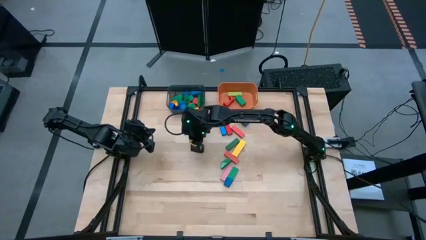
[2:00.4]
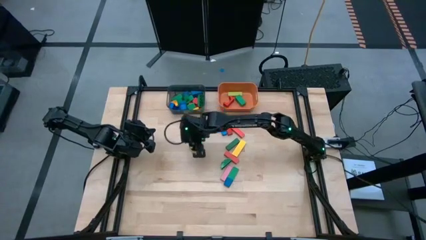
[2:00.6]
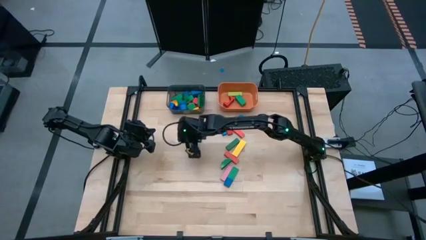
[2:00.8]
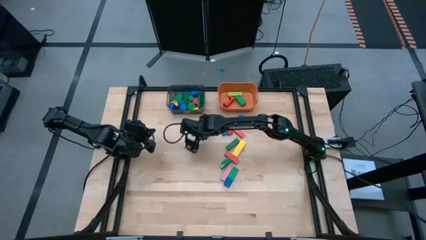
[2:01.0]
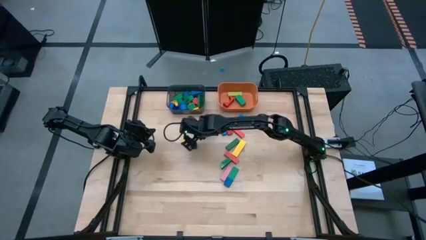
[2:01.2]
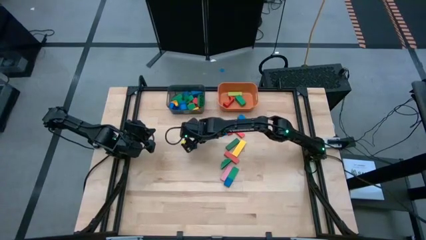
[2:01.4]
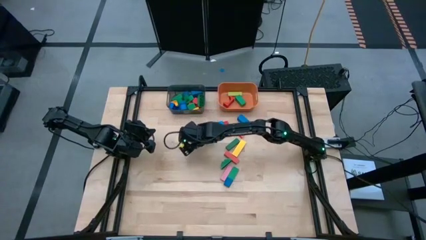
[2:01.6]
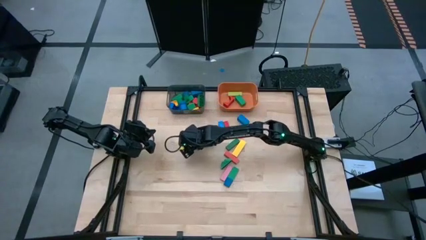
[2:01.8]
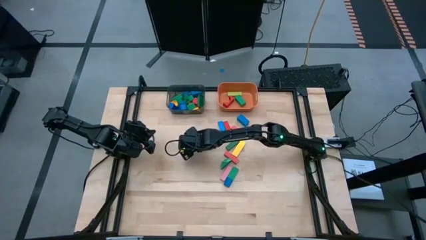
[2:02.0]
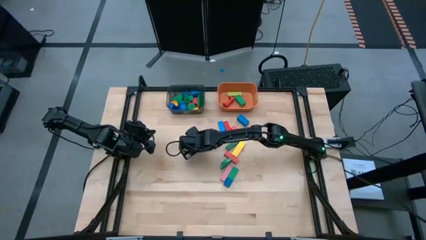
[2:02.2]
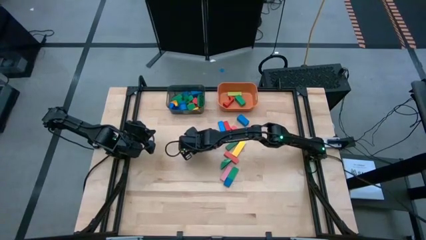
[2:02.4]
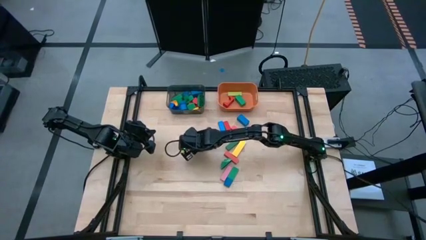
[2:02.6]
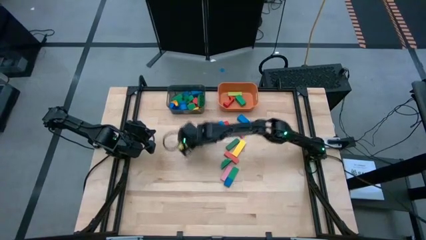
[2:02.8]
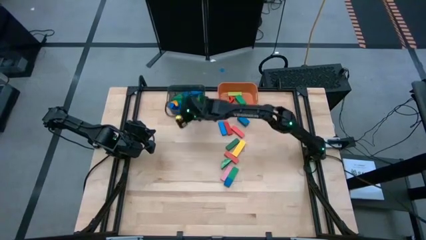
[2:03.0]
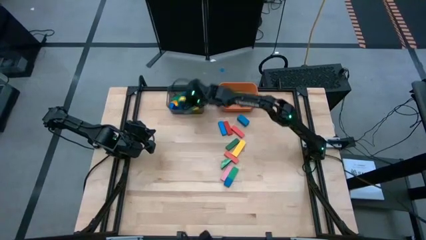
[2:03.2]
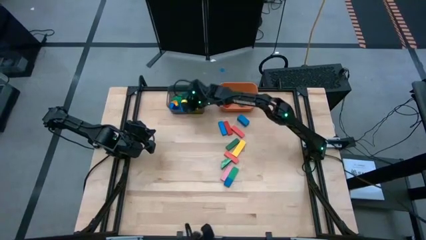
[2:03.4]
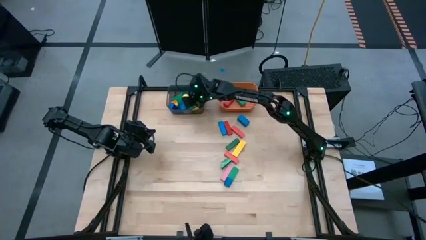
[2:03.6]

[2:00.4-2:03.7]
Task: Sort blocks by size
Put the small blue block into the black bin

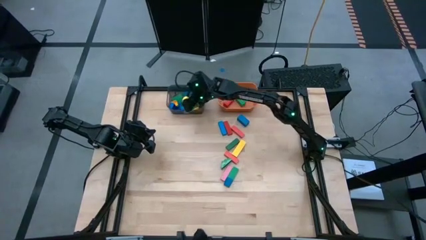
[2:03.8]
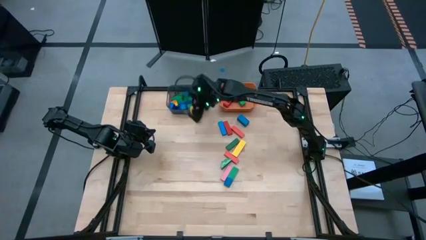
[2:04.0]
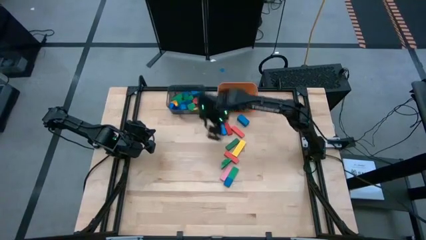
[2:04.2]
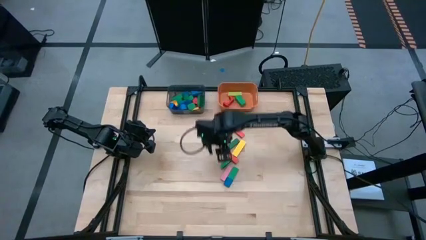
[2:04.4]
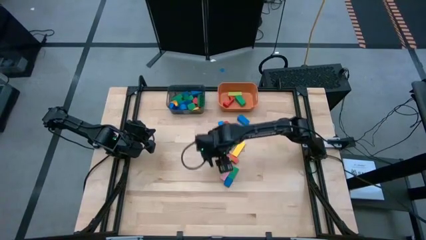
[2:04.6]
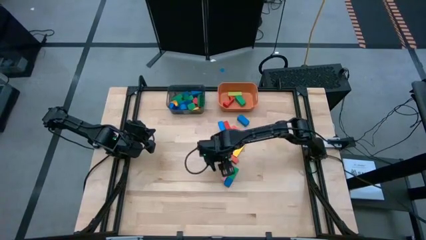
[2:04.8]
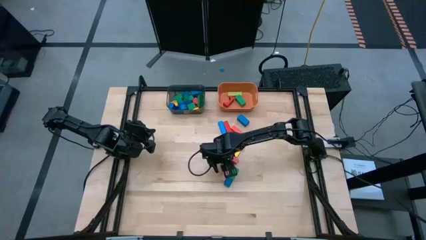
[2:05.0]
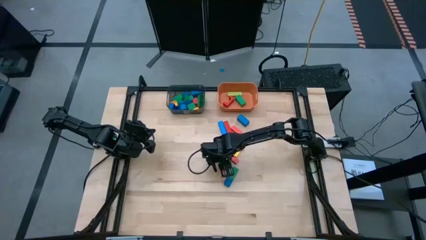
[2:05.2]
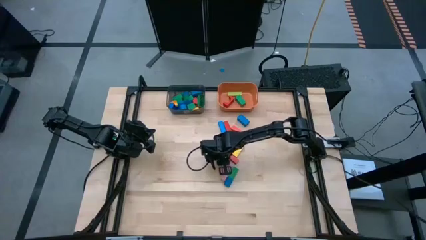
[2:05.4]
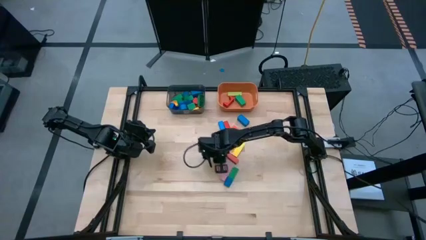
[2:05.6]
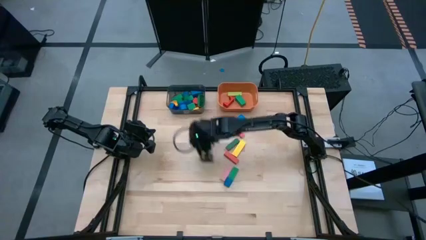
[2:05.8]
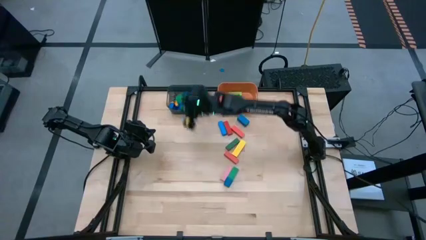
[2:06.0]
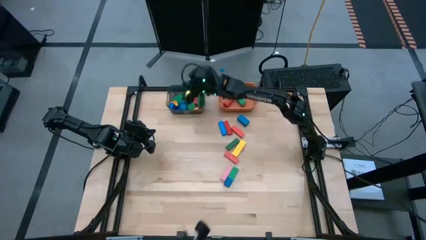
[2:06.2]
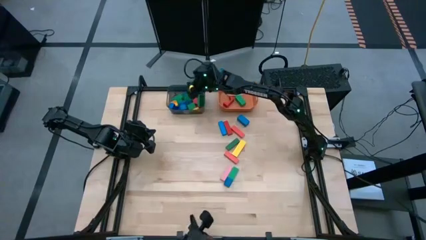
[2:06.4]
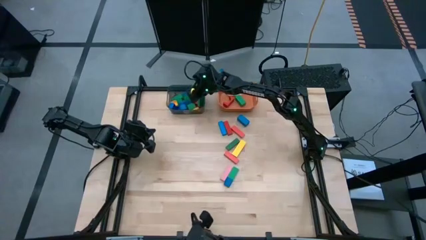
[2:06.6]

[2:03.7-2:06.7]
Put the small green game piece into the black bin

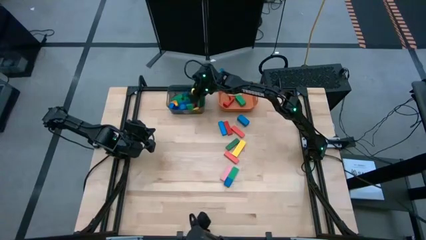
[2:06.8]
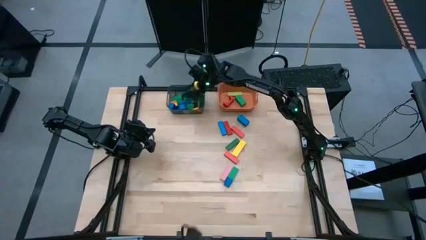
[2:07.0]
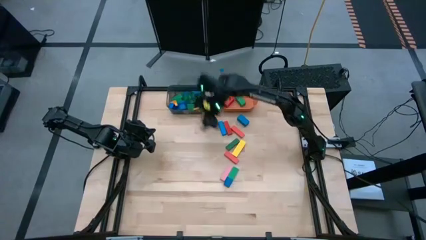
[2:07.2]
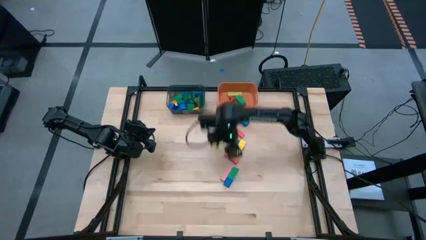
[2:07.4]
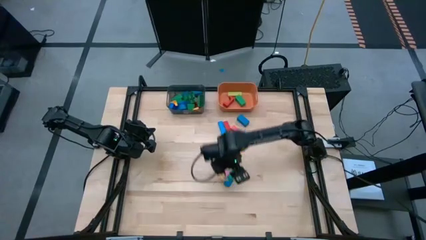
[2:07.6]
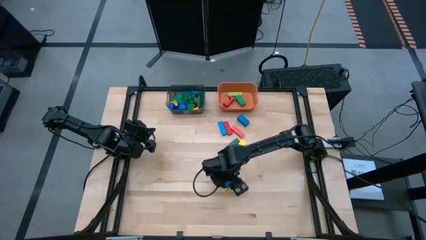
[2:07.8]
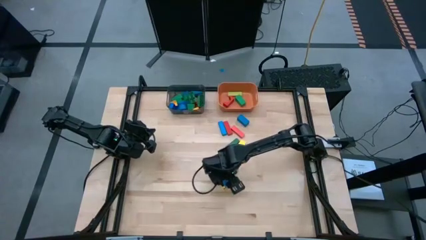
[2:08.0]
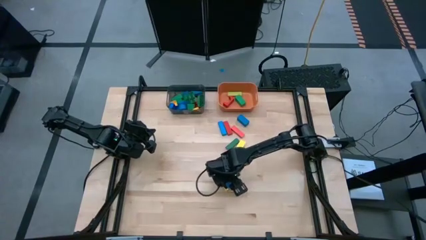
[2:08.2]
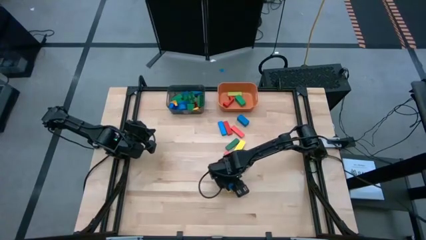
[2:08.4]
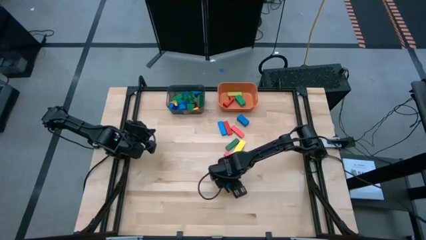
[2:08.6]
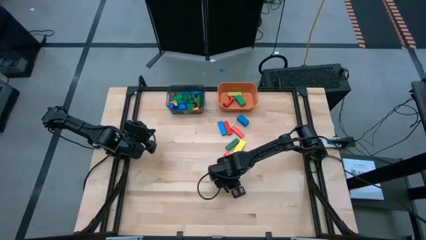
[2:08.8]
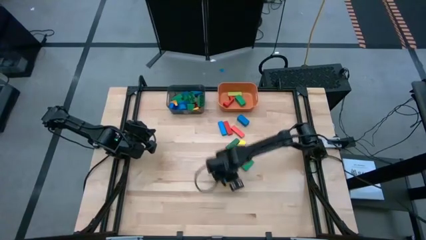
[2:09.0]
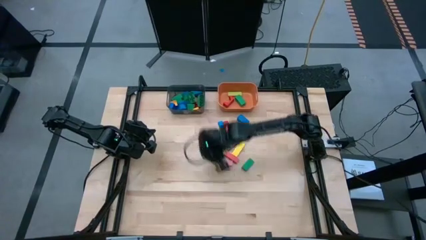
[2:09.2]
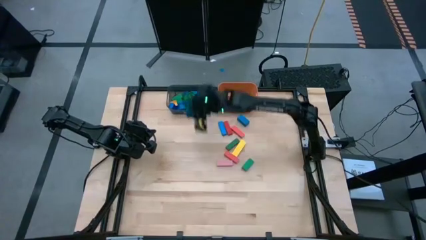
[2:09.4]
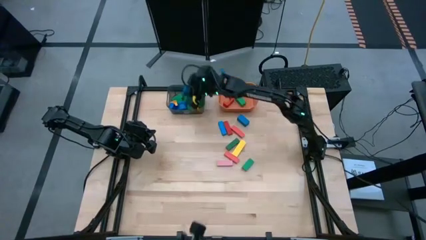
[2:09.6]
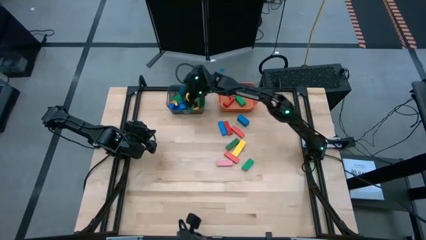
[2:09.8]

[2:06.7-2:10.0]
Put the small blue block into the black bin

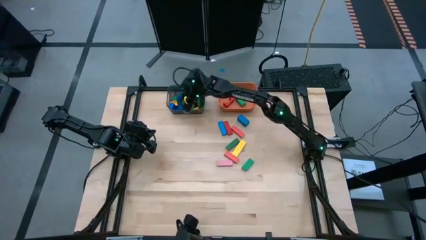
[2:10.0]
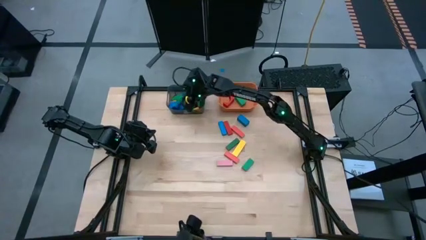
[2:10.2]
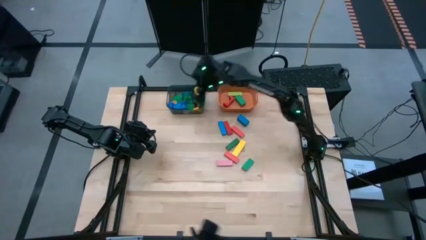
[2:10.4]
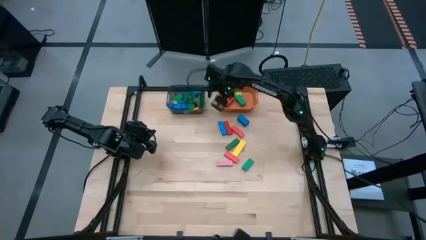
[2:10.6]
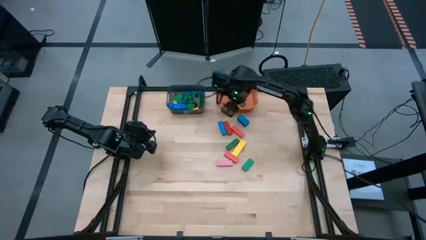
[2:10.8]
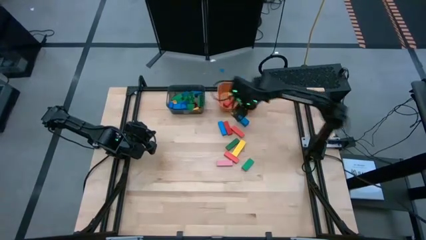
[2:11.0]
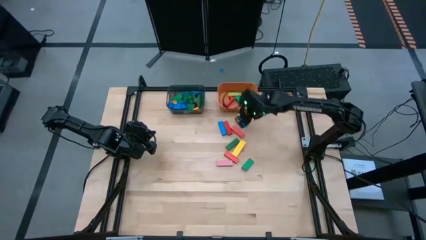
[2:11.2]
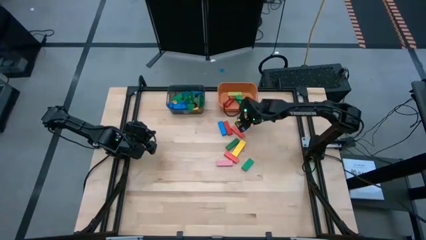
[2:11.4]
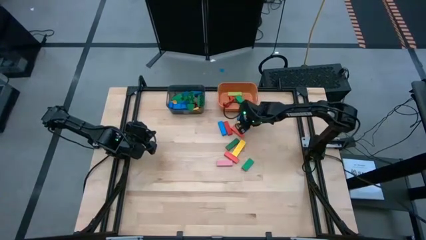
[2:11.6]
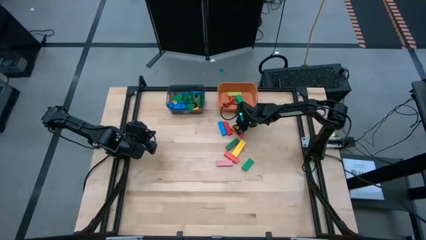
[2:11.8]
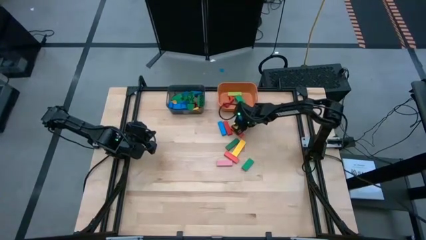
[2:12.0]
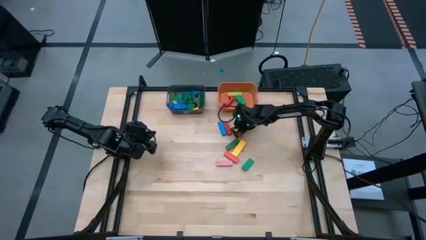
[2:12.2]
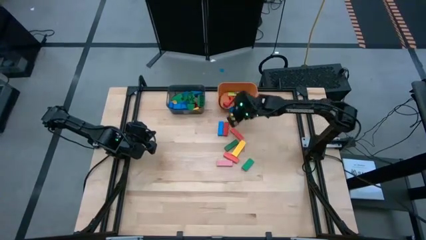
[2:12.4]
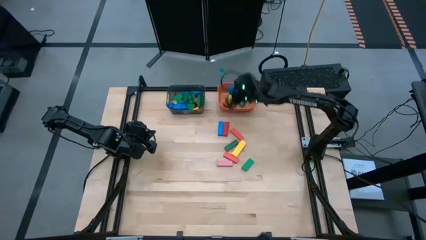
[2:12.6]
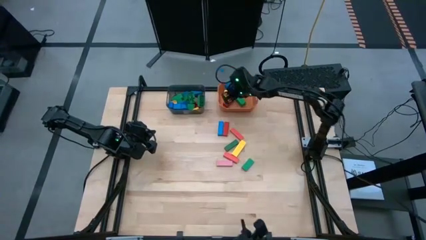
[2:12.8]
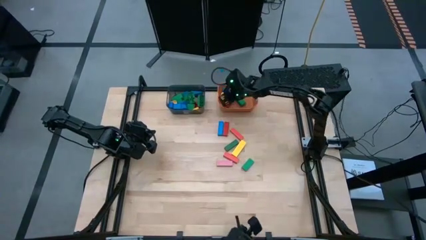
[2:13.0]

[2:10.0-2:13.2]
Put the large blue block into the orange bin

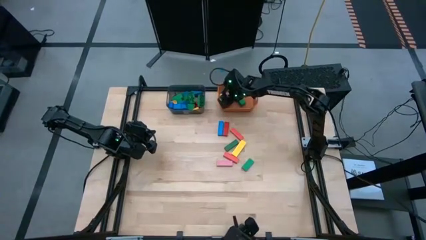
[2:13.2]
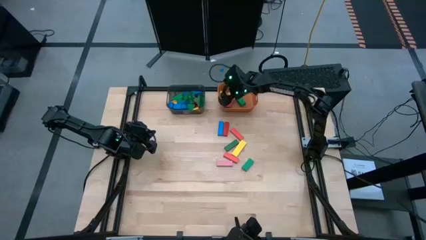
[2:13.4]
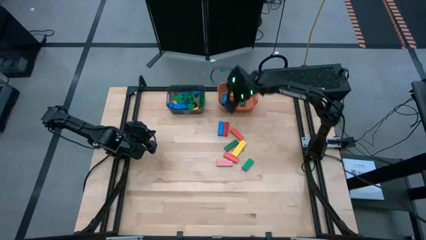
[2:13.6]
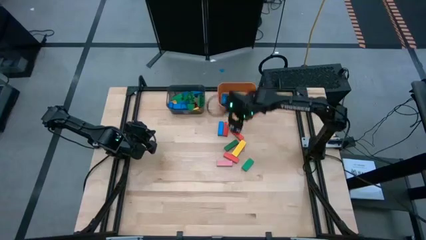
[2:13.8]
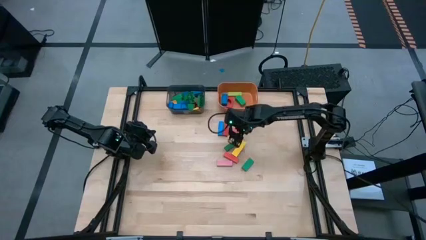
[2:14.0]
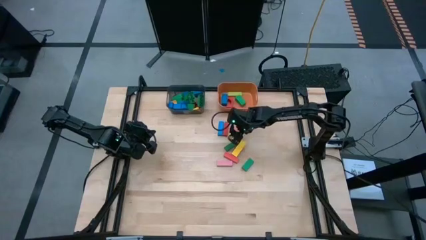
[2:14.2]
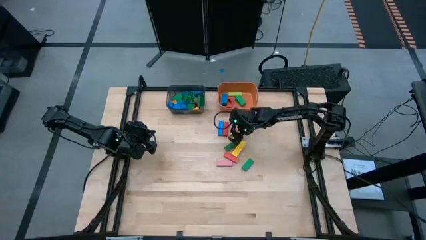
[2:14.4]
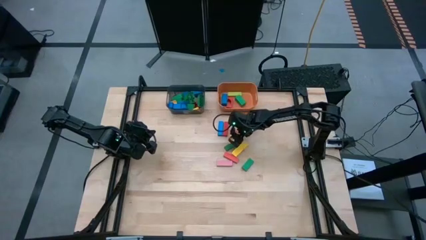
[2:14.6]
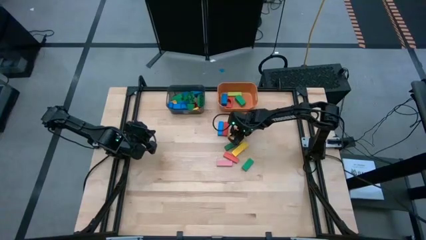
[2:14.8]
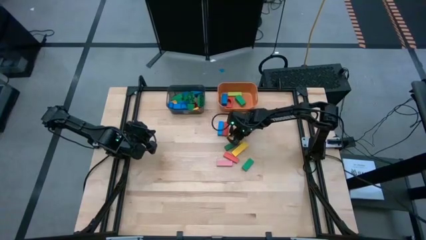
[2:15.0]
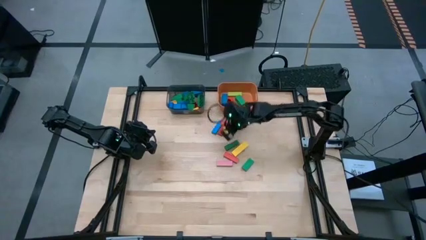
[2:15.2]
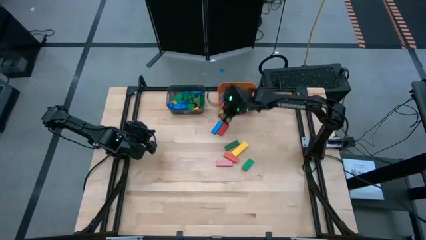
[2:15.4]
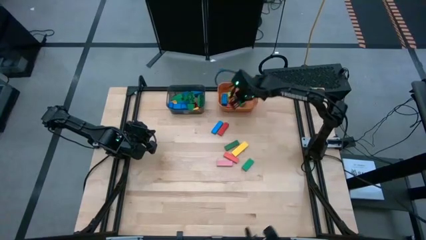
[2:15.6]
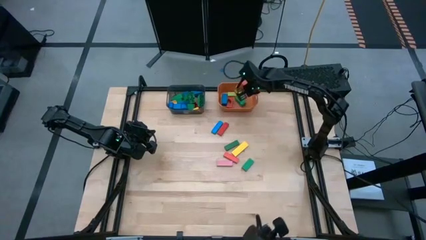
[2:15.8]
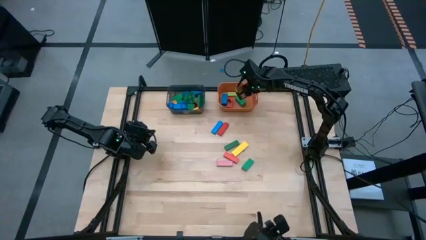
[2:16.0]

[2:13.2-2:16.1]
Put the large red block into the orange bin
